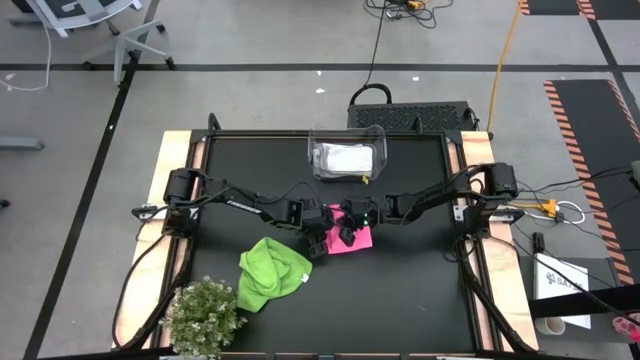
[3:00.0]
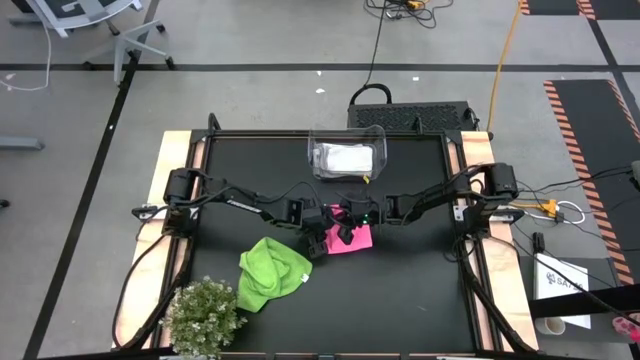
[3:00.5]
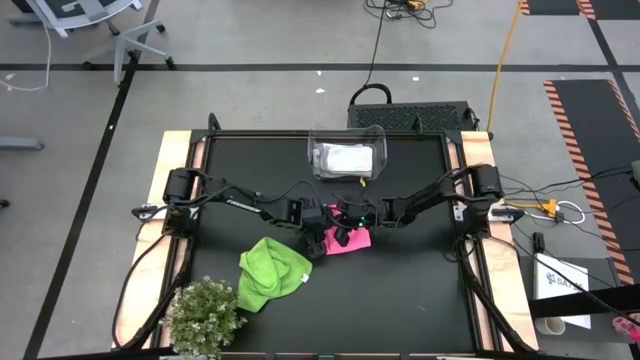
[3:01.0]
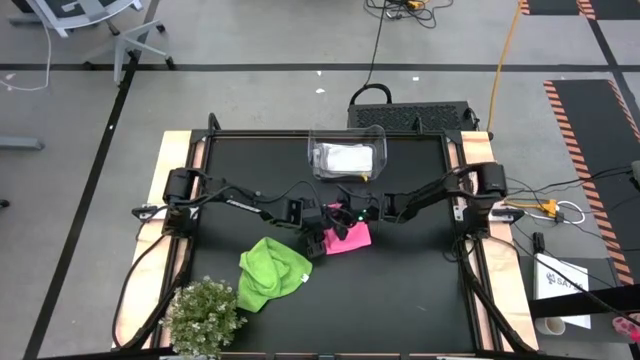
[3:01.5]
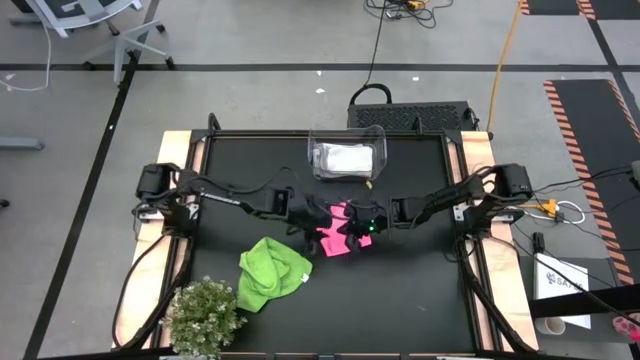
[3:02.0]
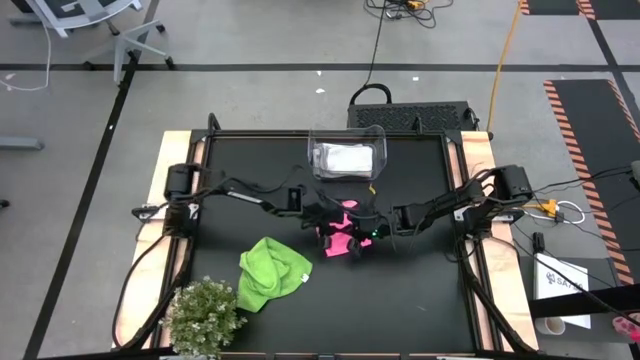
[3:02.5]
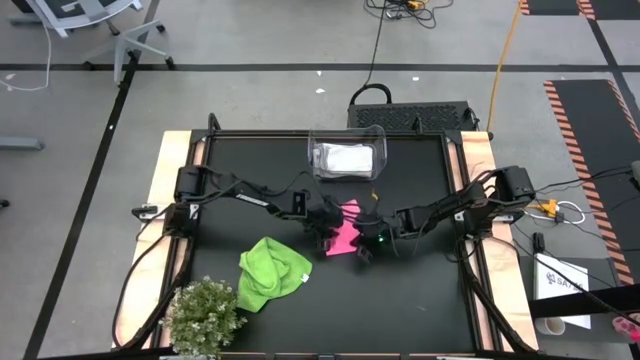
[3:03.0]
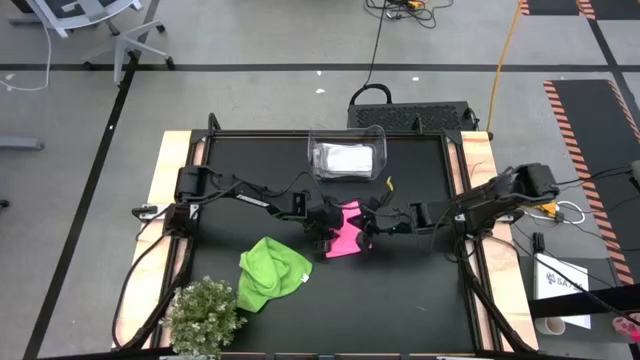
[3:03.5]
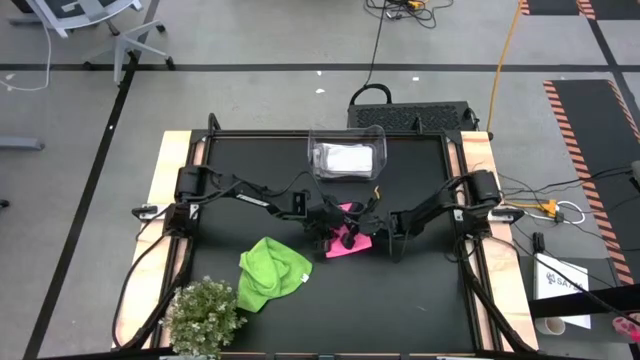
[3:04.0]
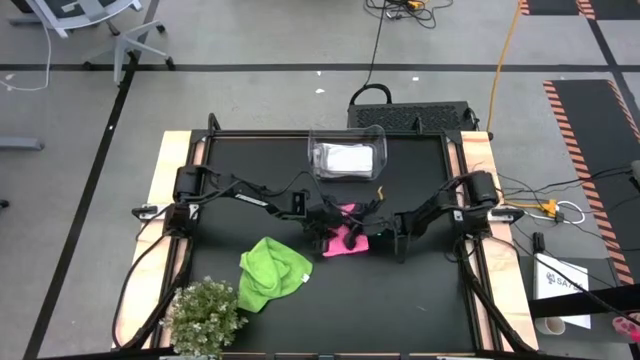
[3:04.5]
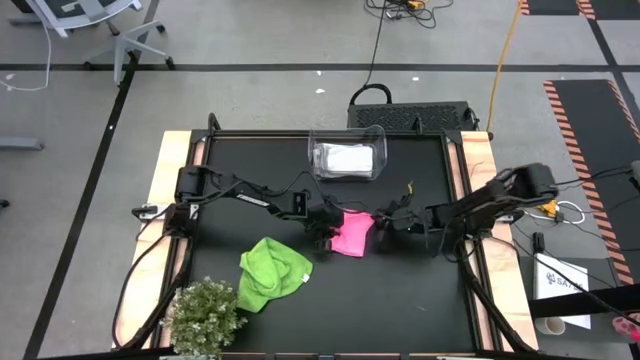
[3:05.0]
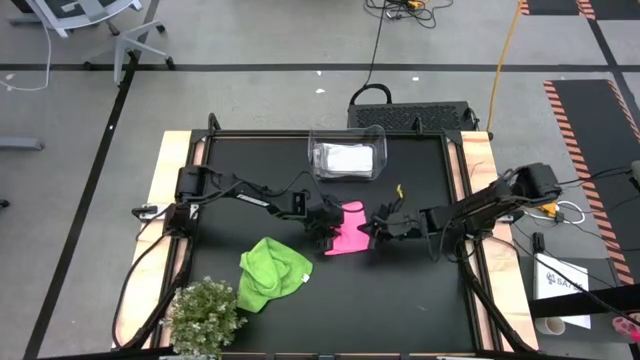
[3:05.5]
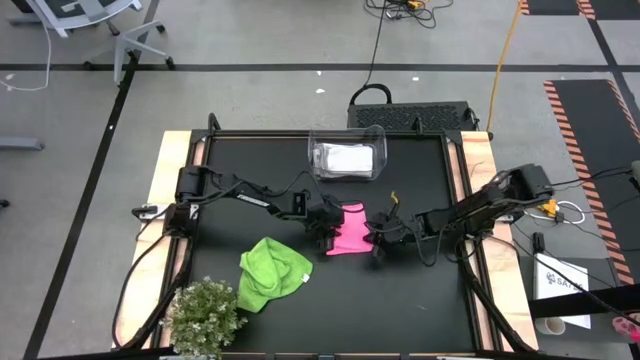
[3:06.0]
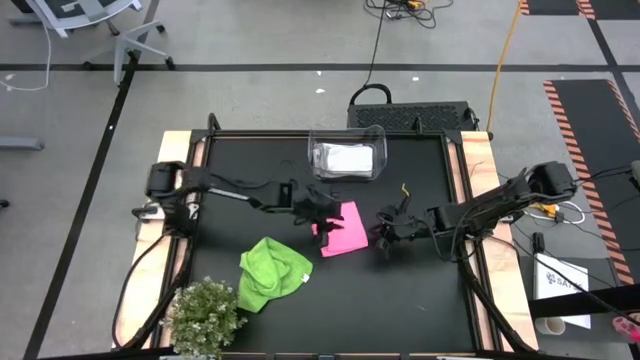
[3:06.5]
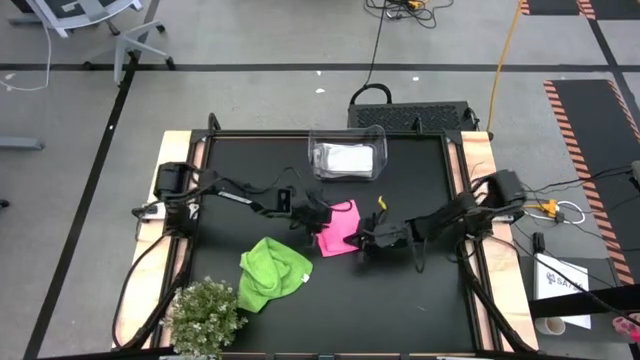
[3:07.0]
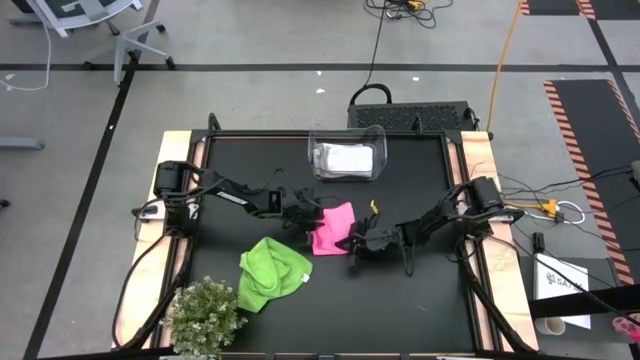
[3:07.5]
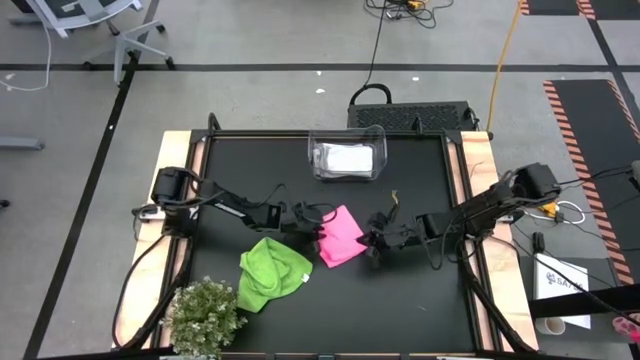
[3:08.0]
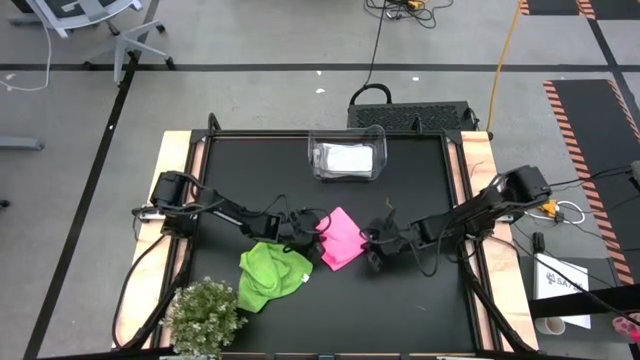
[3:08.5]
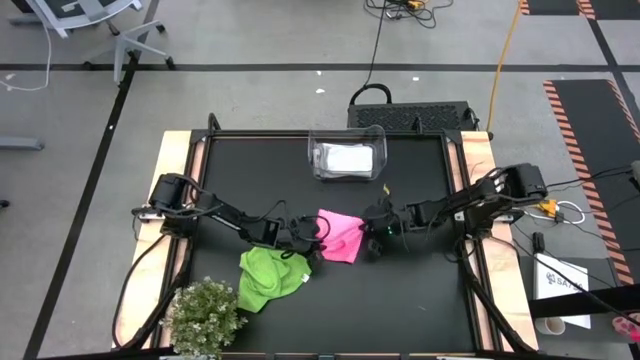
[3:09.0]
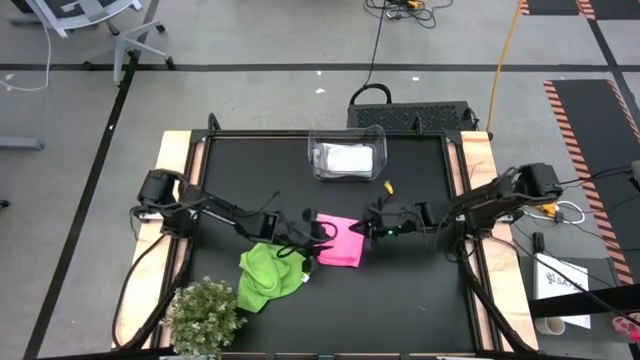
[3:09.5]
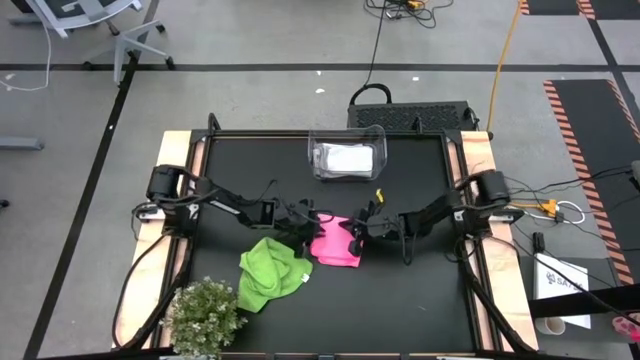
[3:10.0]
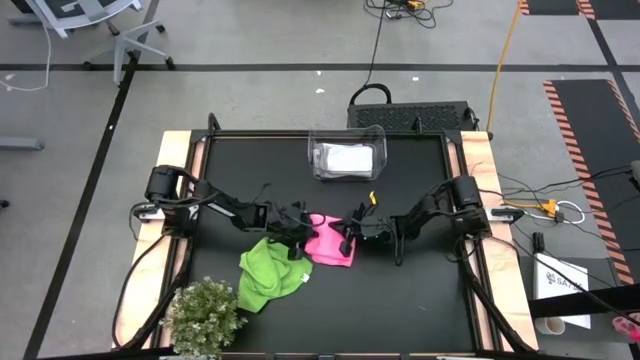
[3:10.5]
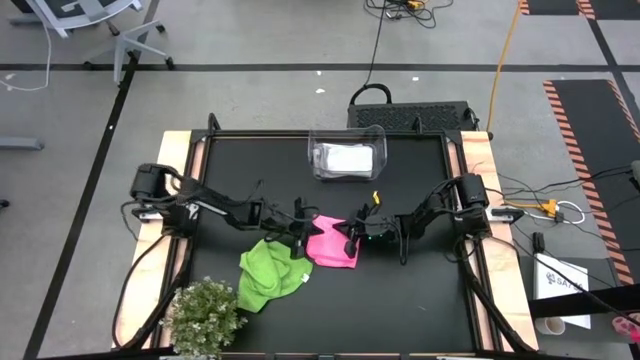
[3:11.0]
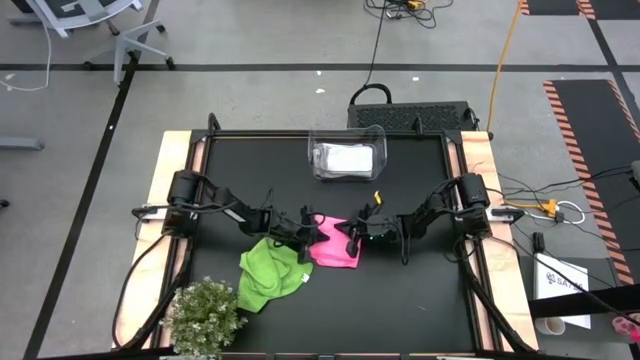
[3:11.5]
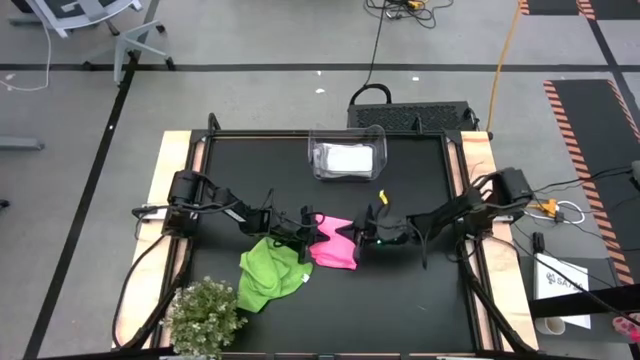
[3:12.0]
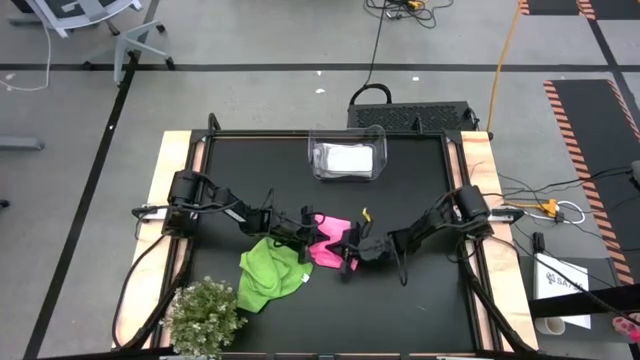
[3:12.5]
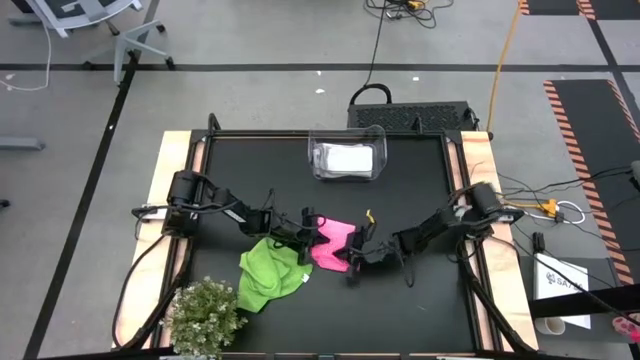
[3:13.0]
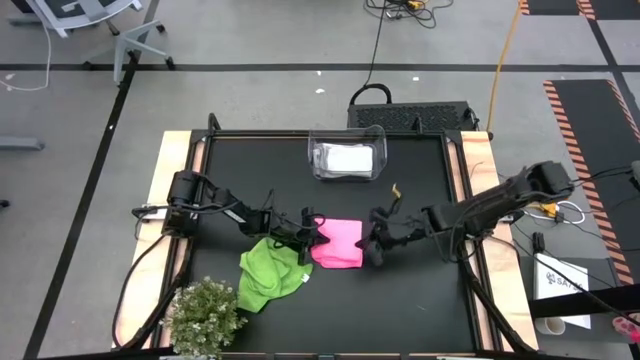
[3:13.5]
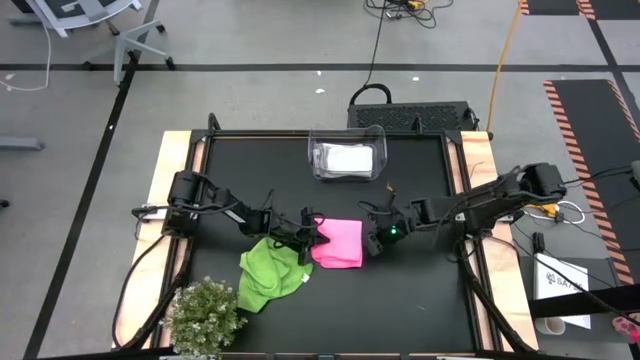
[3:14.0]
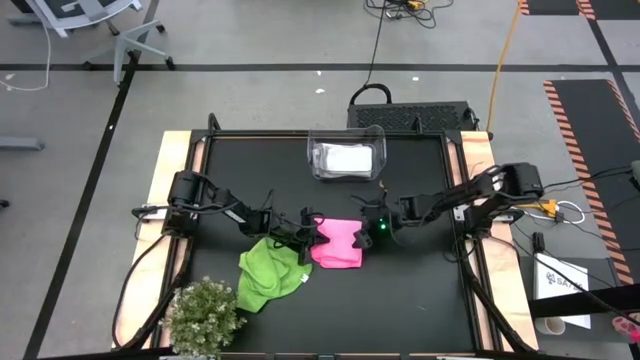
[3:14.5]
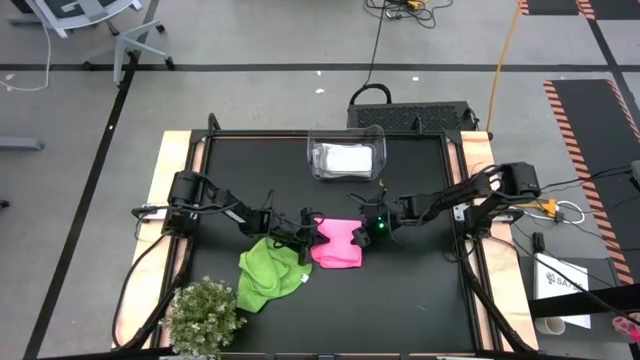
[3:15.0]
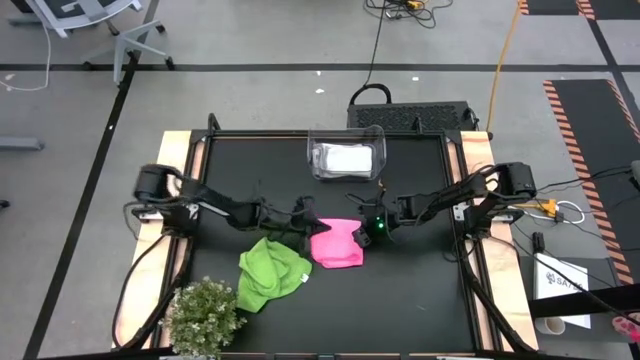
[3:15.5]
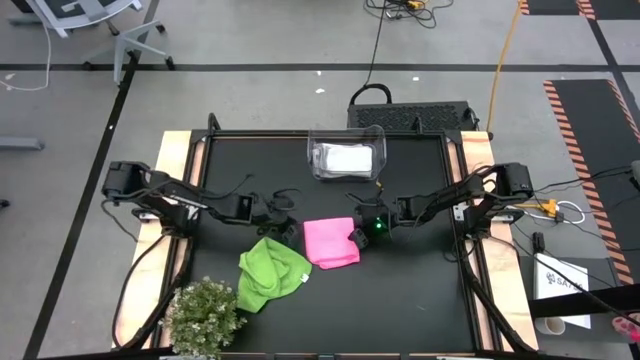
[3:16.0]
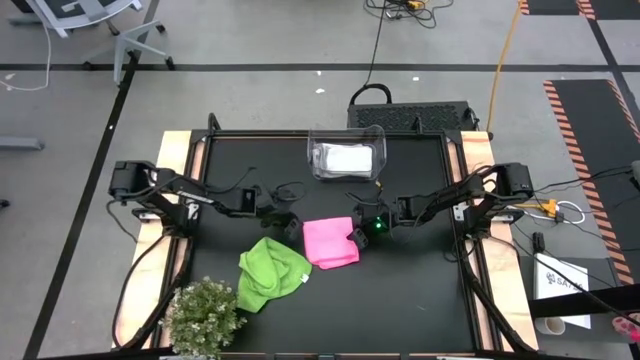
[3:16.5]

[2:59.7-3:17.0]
Task: Fold microfiber towels
Fold the pink microfiber cloth

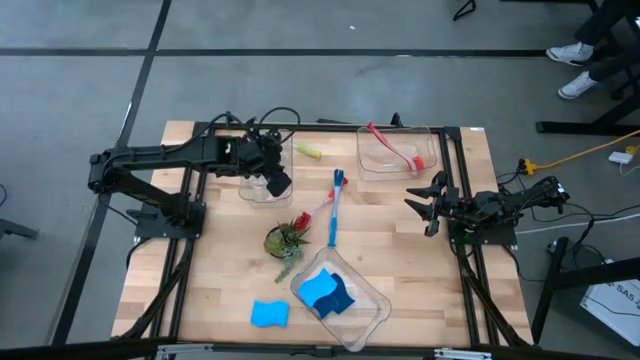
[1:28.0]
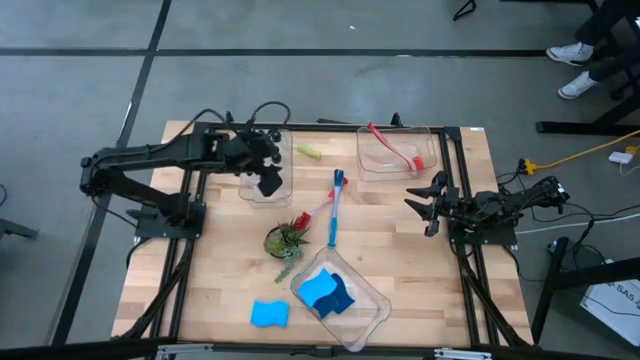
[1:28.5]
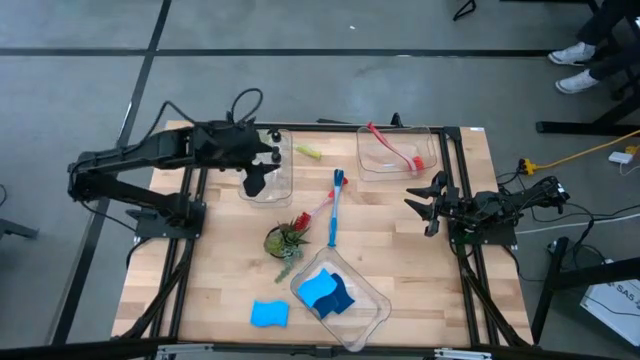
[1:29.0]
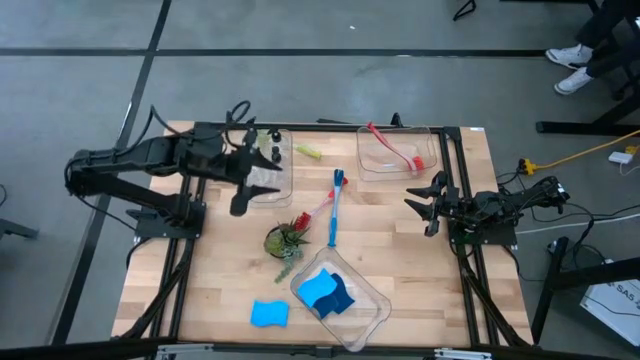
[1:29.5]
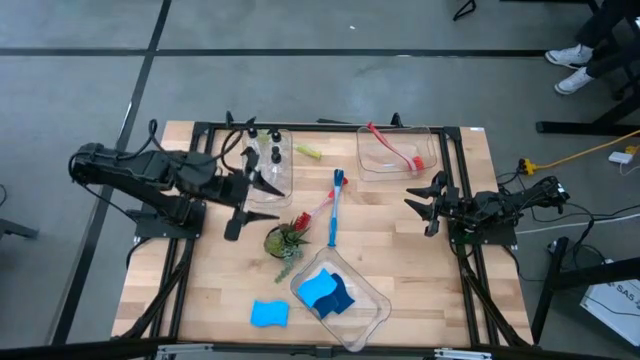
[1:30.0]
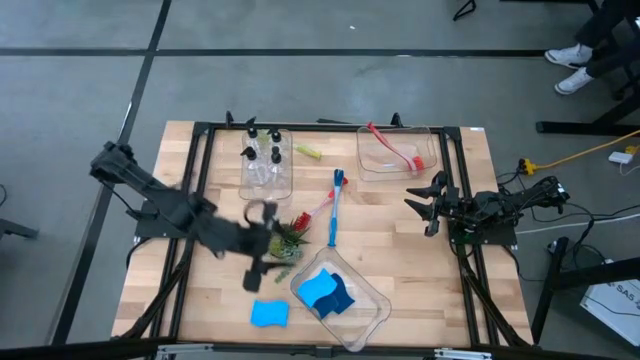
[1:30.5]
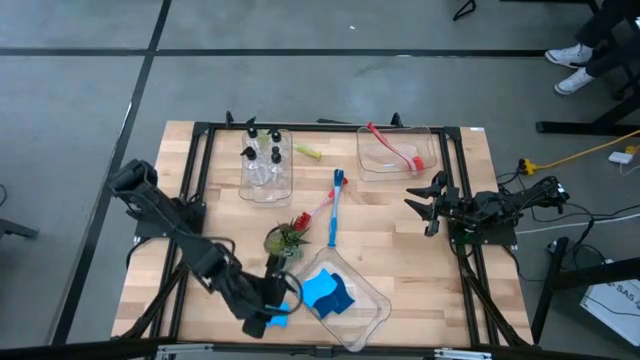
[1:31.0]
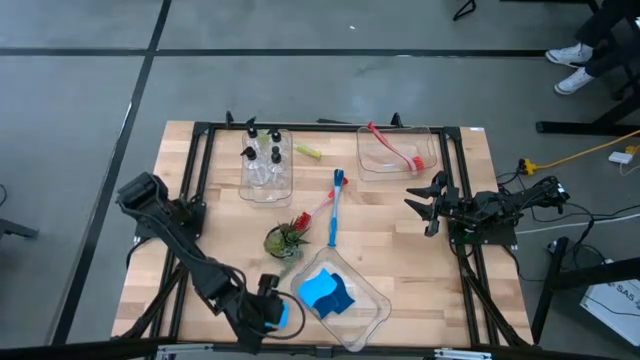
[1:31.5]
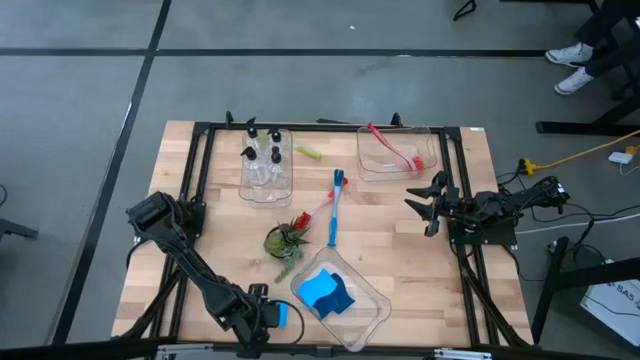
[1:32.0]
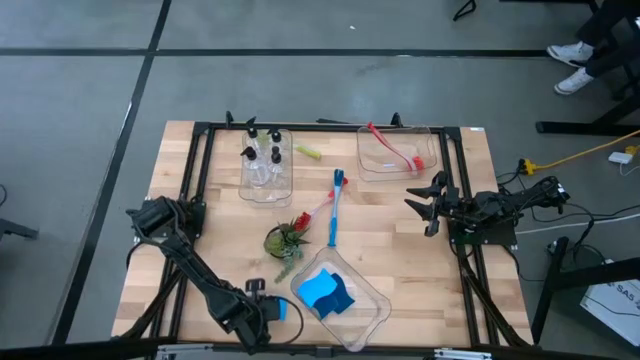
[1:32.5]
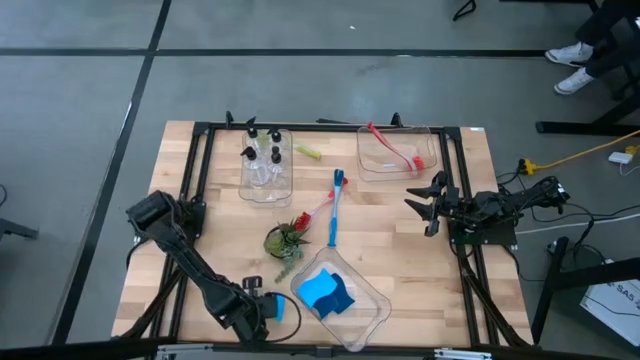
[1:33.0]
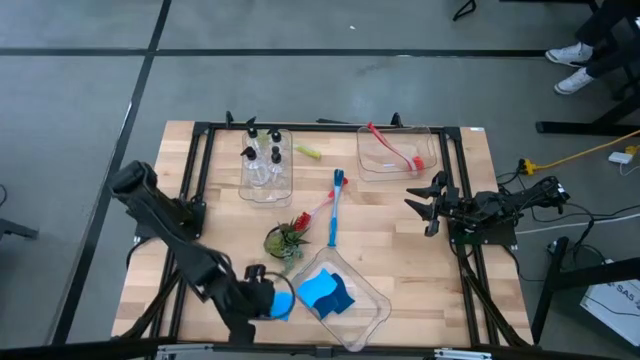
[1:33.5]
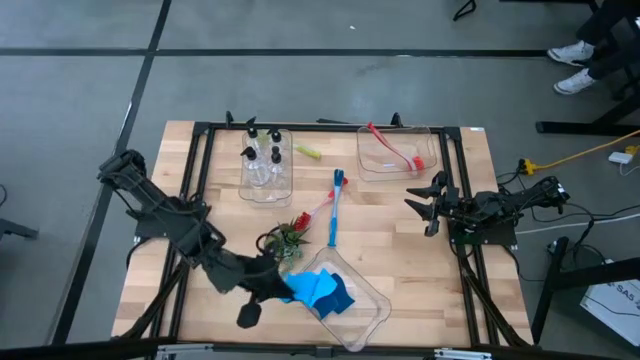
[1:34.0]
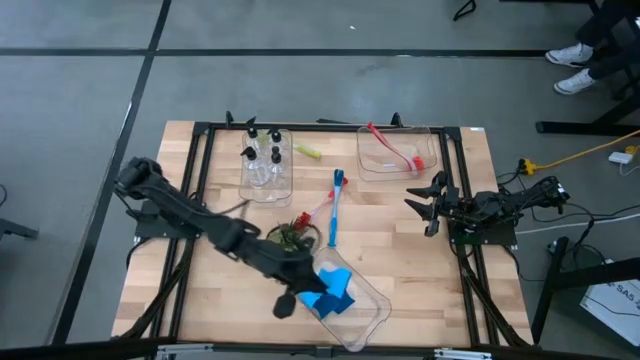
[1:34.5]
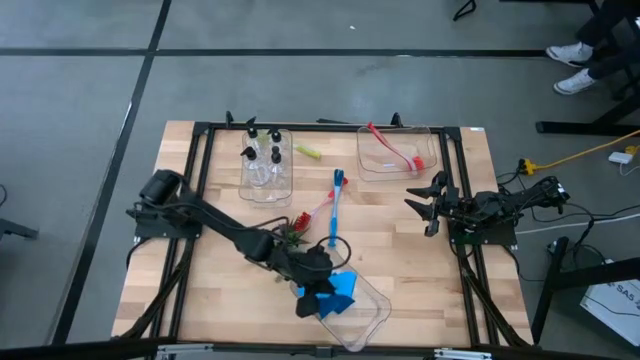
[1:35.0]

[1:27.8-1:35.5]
Task: Pick & Place Kitchen Sink Supplies
Put the blue sponge into the bottom transparent bin
